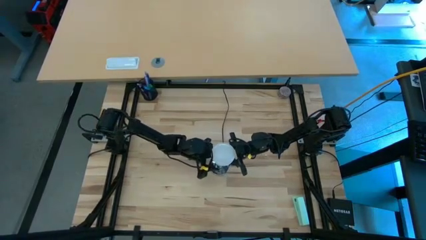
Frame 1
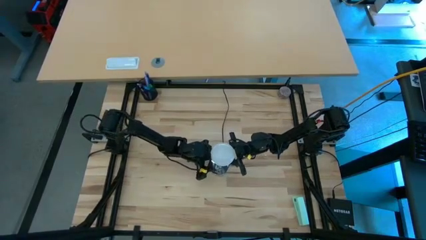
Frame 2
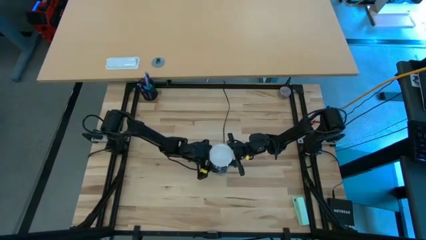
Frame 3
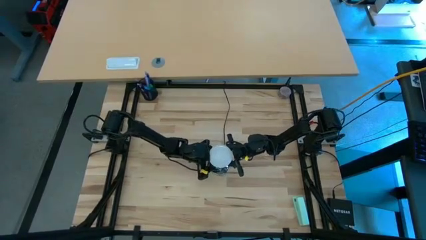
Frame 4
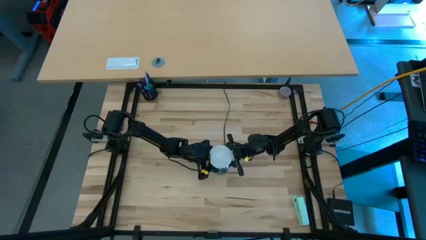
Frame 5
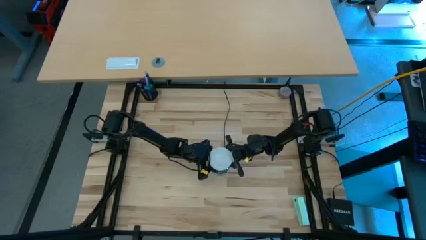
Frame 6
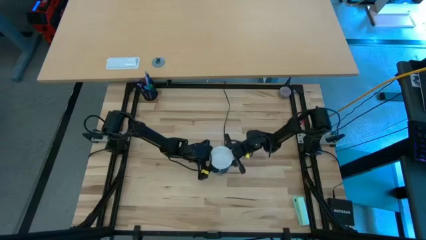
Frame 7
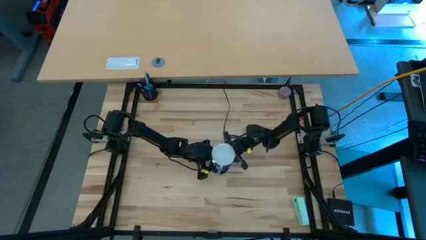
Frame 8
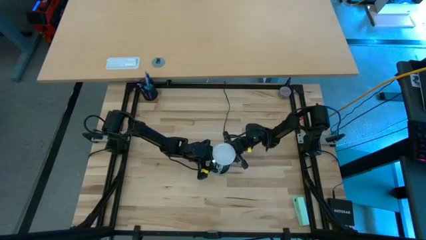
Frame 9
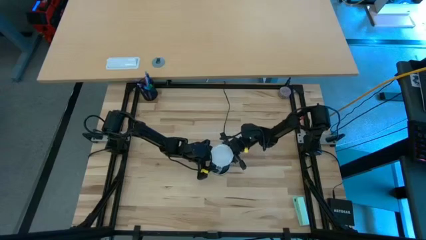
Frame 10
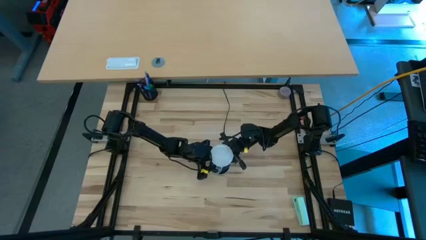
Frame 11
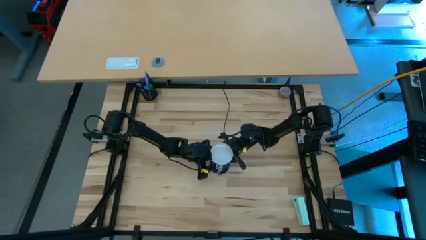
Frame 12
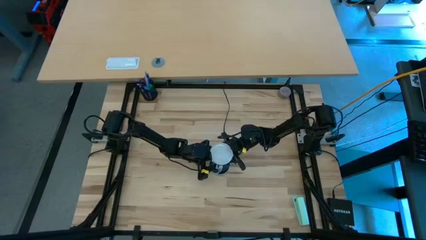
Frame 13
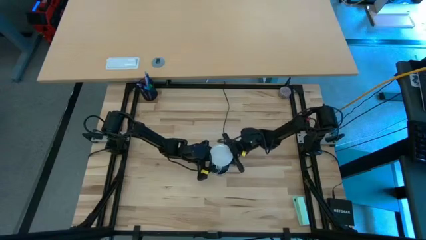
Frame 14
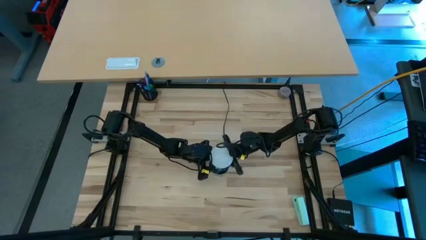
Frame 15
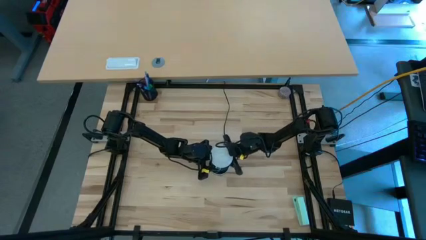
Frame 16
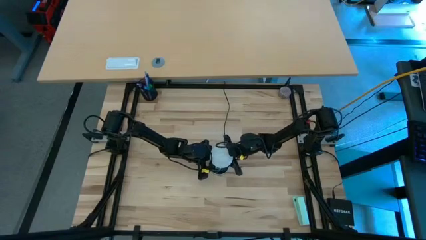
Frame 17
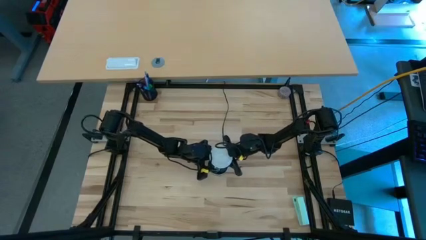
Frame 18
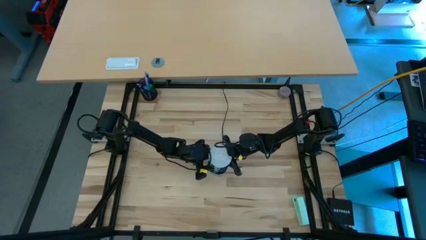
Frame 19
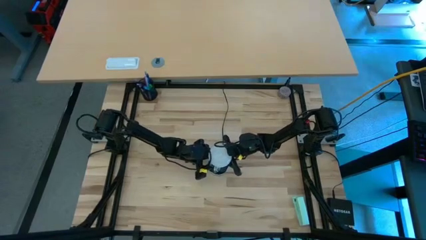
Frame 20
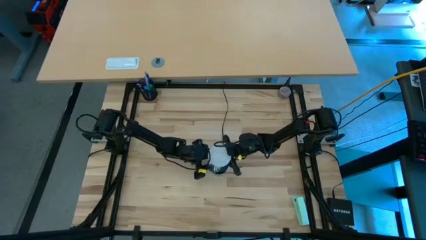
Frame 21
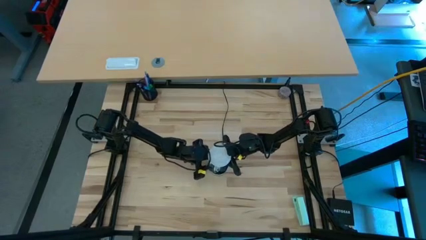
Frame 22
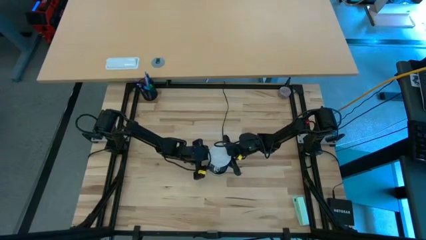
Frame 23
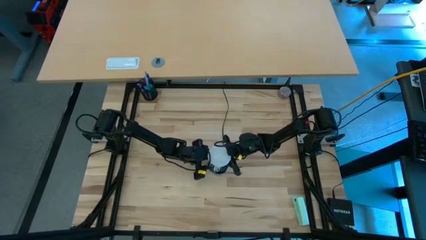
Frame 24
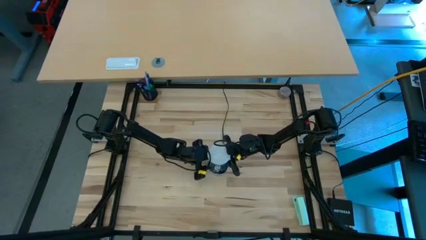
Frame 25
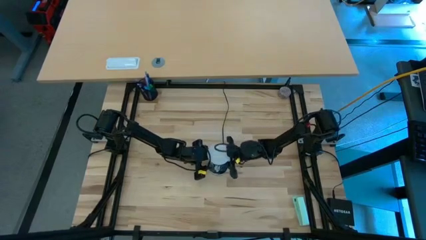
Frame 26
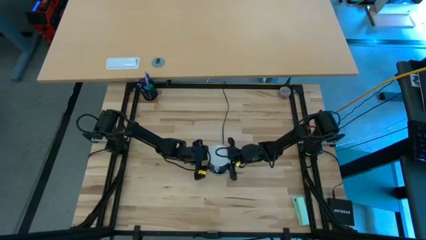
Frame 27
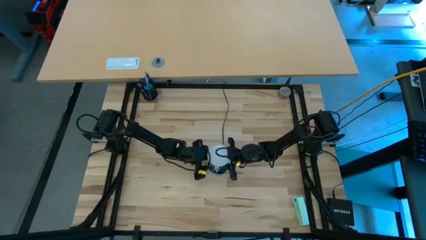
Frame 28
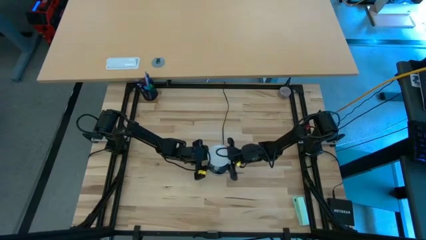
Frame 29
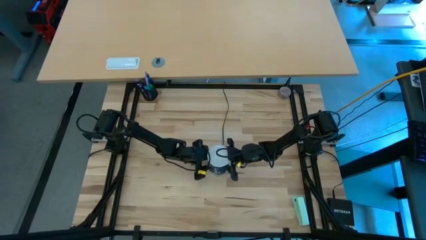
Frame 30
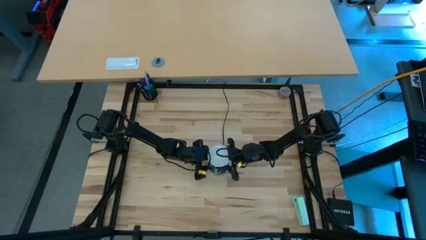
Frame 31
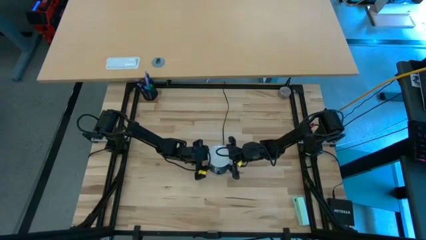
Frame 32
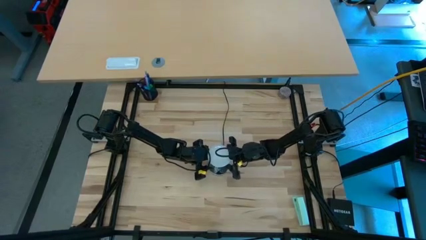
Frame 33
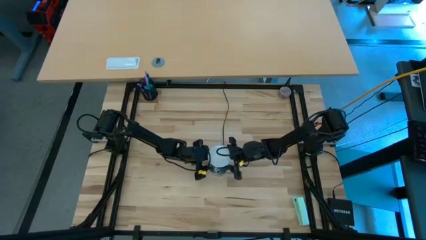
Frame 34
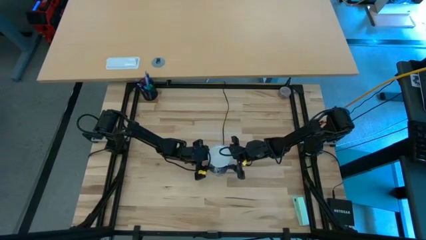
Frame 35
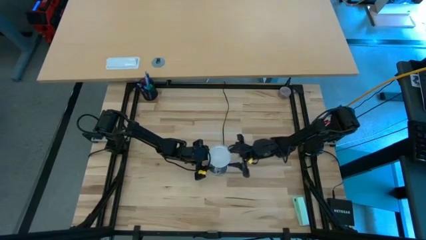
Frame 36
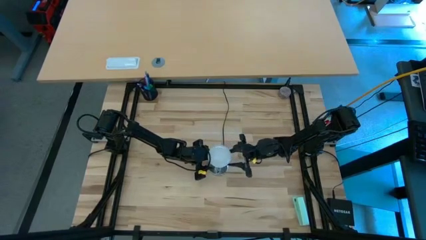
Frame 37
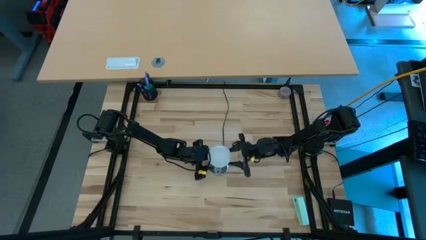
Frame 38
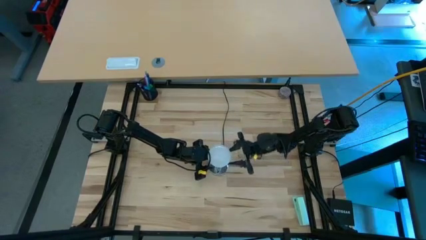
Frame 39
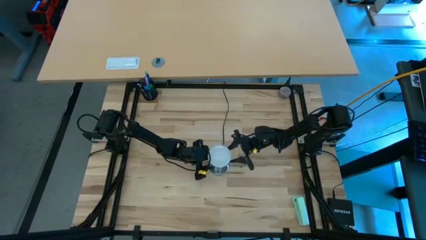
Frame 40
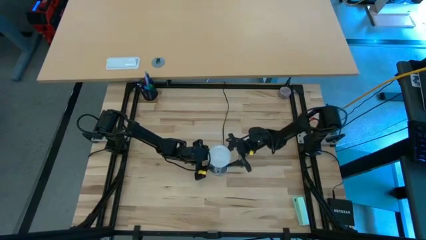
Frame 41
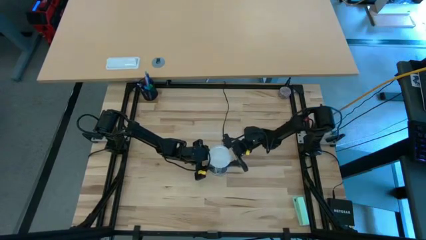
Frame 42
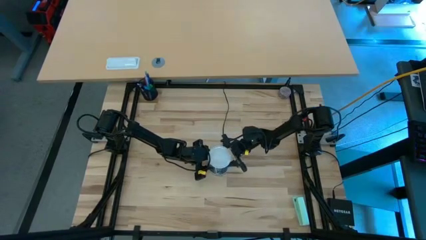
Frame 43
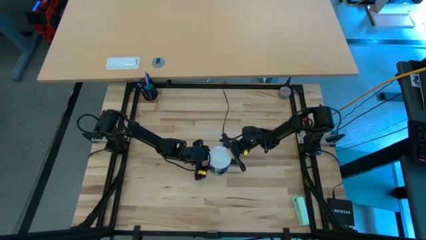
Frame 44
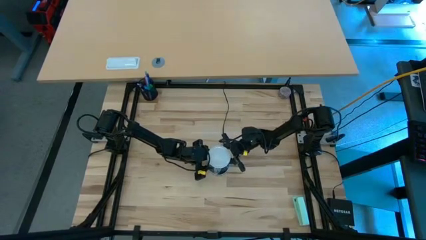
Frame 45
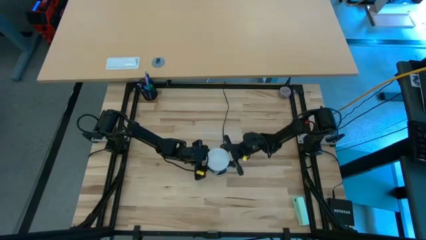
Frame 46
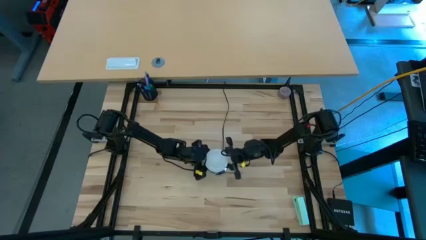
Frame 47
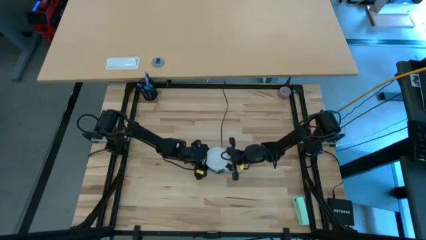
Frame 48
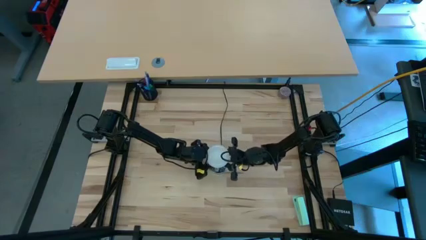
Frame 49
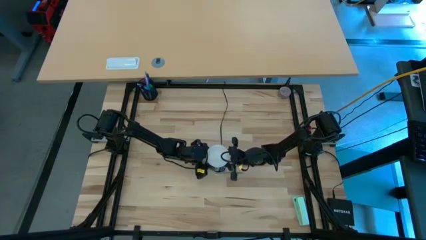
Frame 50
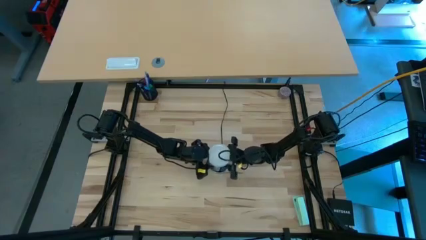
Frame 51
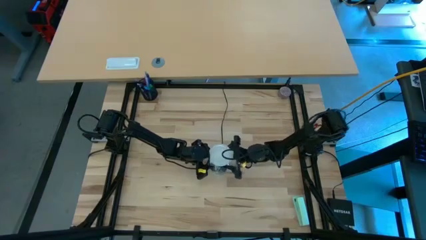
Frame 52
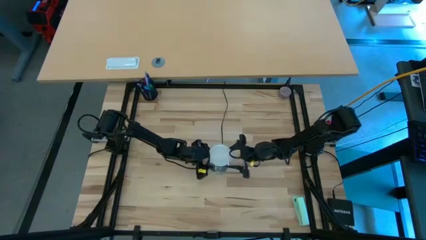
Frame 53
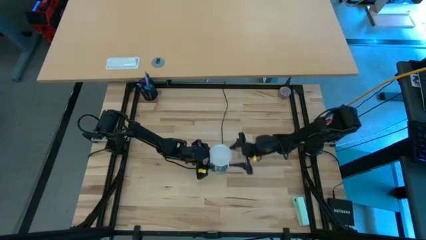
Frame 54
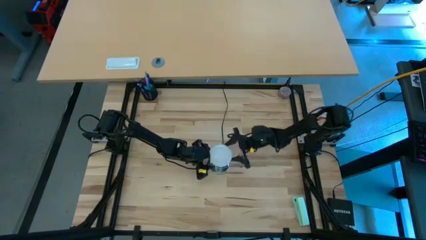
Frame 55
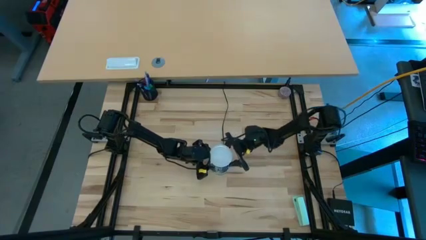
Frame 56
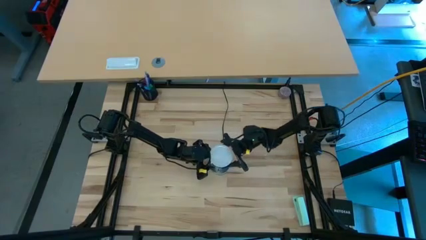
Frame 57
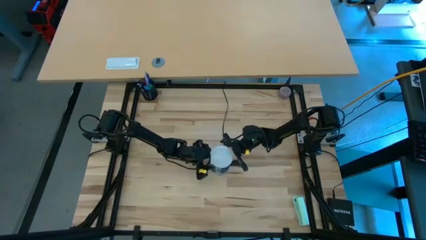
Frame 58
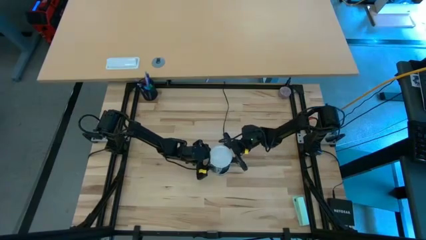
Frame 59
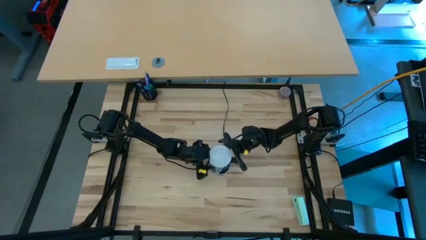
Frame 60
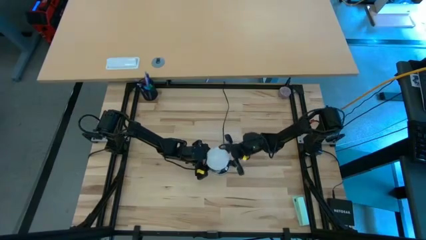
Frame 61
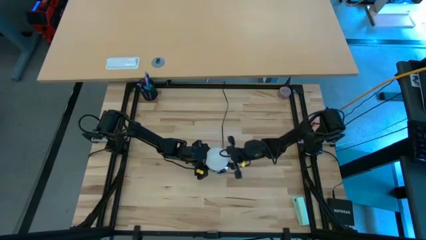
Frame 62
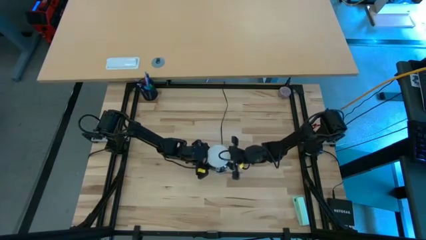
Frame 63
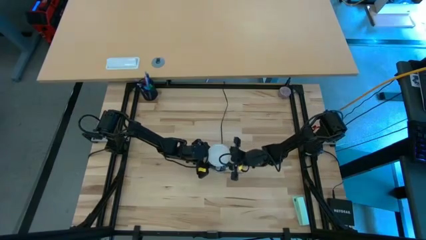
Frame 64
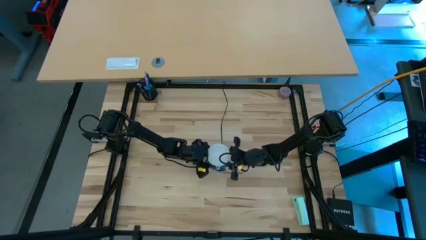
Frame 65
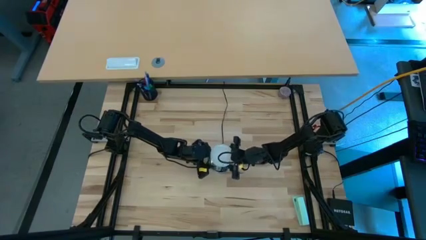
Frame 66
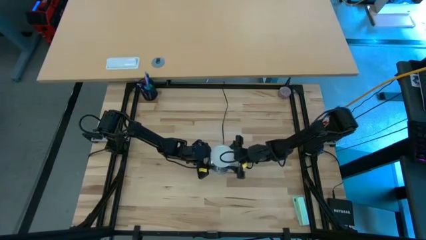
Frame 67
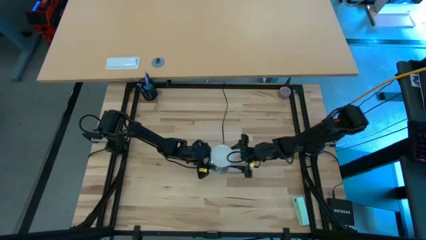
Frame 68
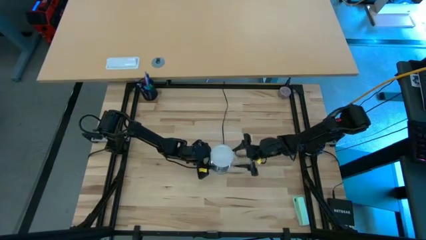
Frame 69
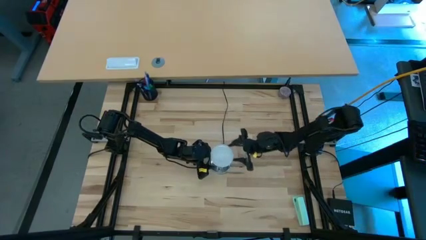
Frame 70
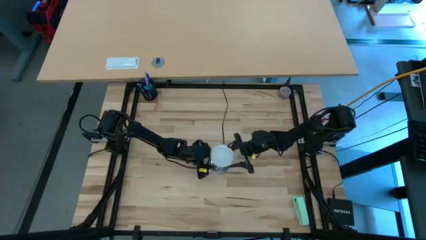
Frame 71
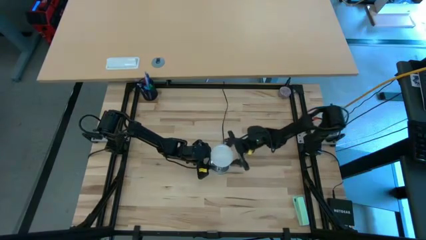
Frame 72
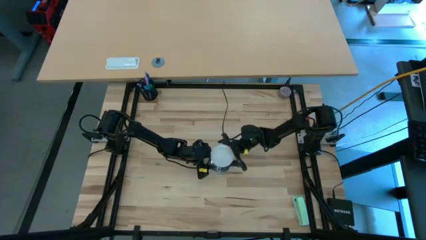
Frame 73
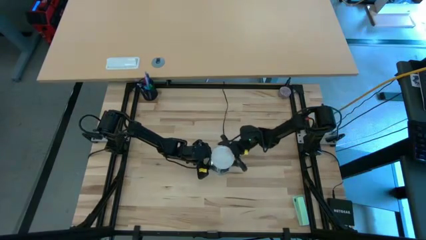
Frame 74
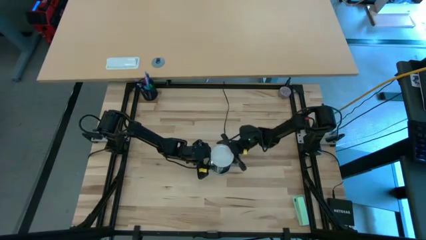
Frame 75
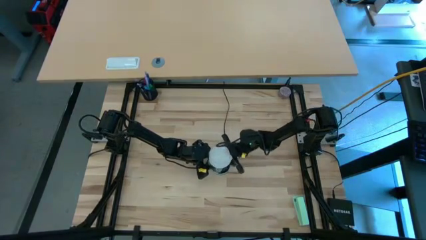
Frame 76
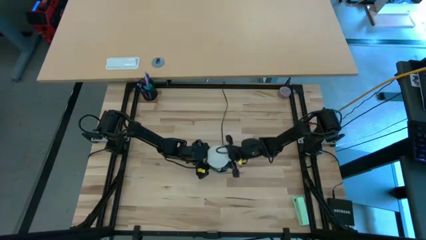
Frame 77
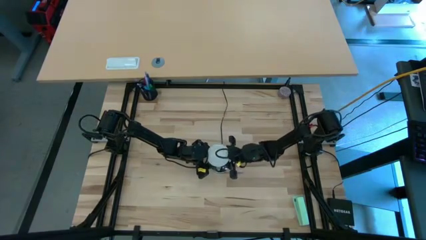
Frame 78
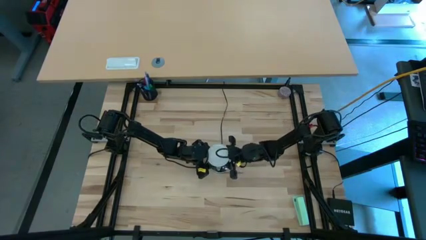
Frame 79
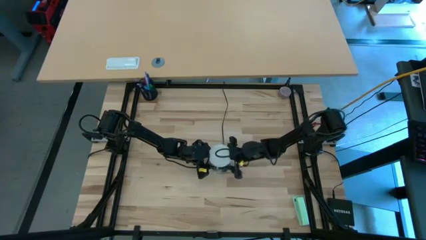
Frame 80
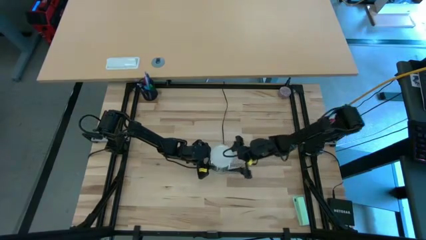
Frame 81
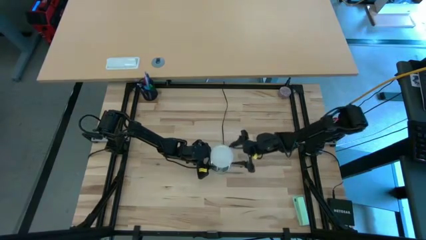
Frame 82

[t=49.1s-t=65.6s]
Task: Screw lightbulb
Insert the lightbulb into the lamp
